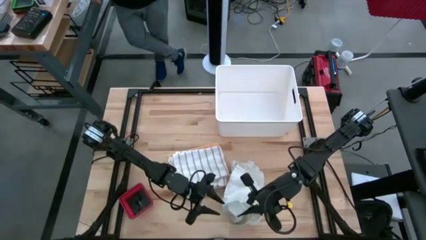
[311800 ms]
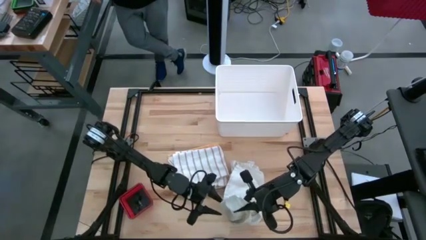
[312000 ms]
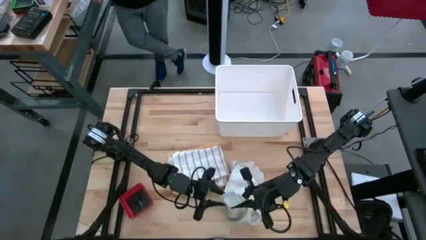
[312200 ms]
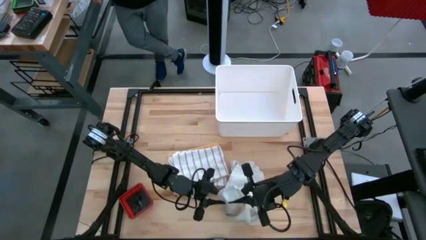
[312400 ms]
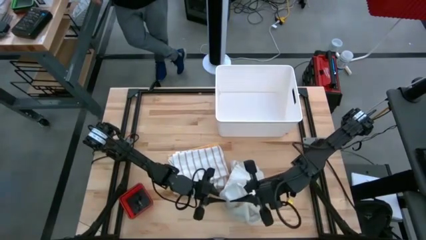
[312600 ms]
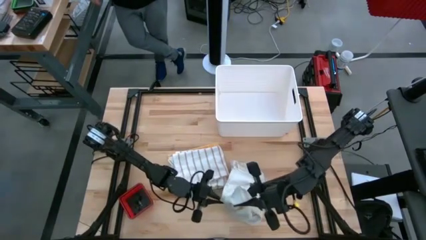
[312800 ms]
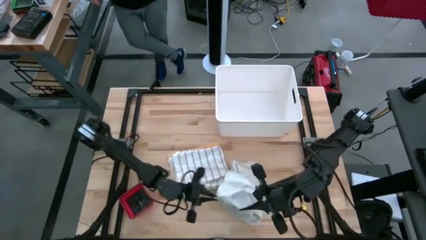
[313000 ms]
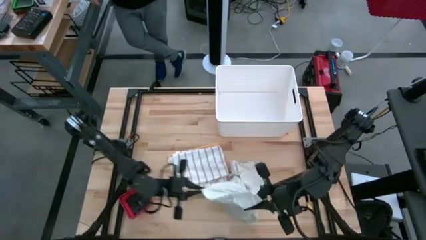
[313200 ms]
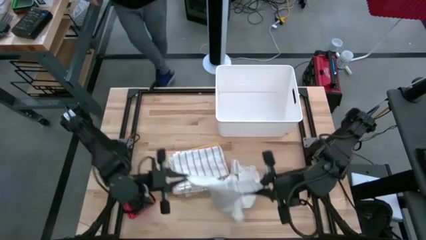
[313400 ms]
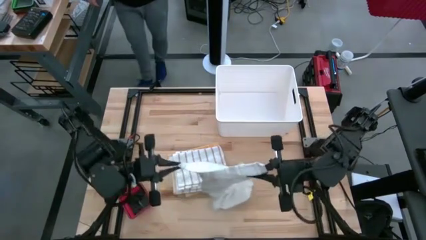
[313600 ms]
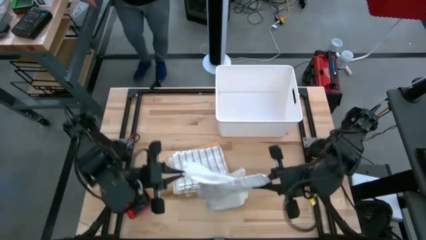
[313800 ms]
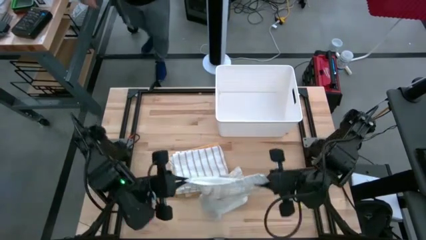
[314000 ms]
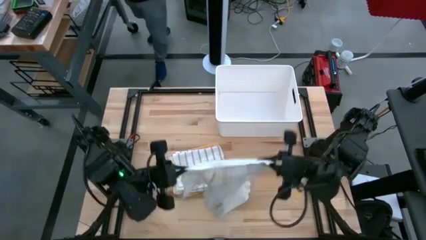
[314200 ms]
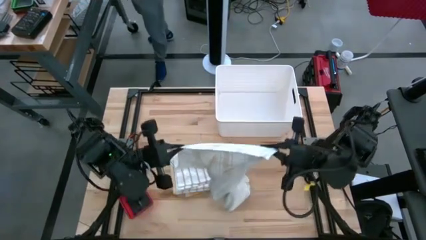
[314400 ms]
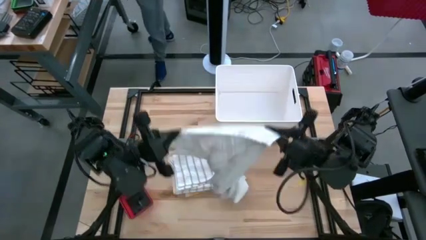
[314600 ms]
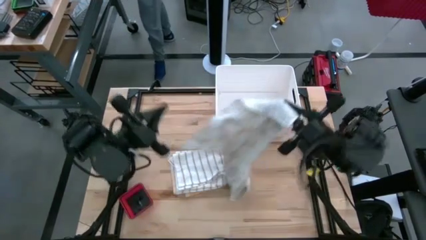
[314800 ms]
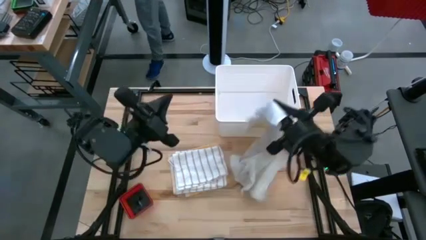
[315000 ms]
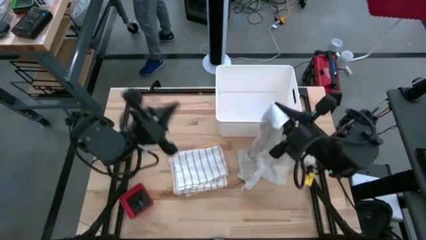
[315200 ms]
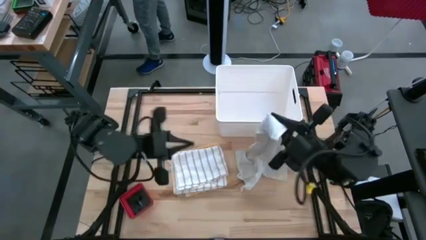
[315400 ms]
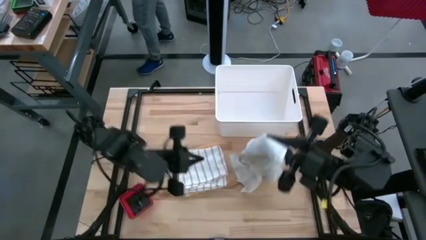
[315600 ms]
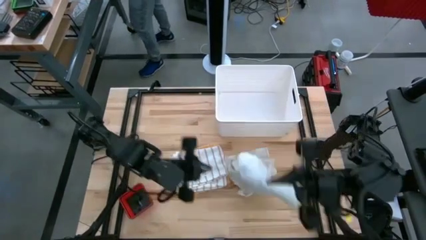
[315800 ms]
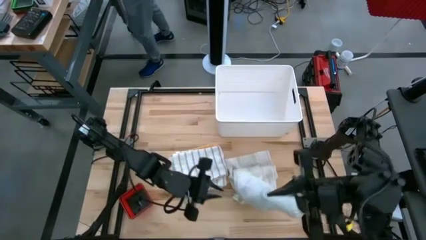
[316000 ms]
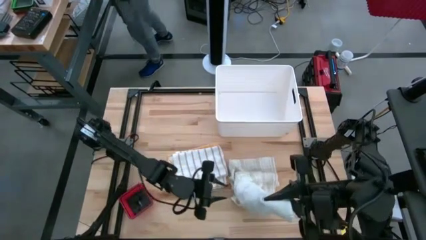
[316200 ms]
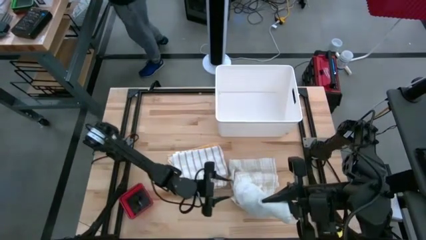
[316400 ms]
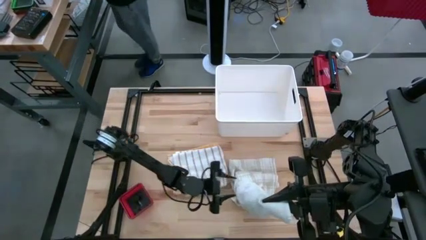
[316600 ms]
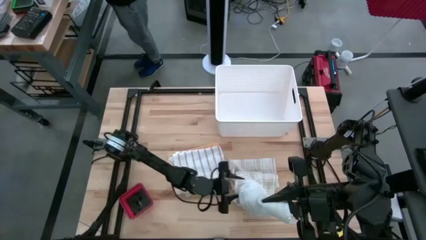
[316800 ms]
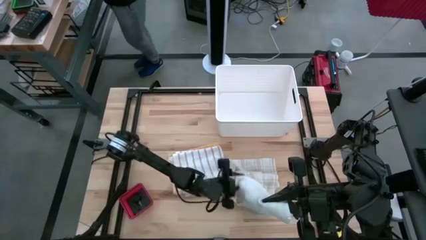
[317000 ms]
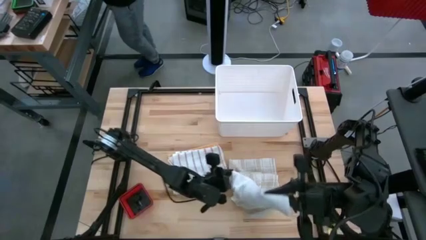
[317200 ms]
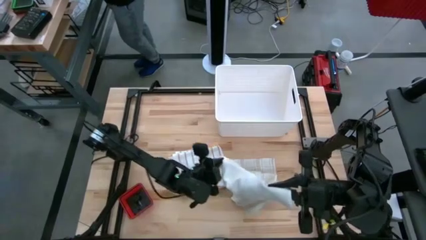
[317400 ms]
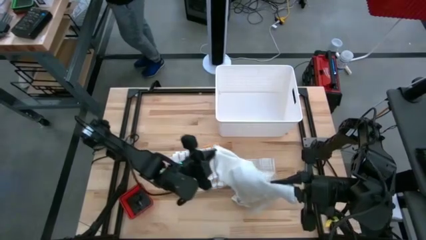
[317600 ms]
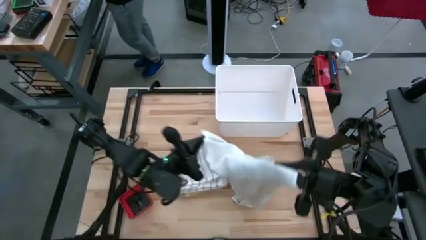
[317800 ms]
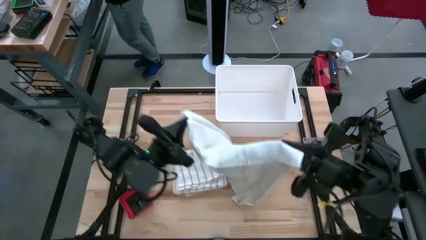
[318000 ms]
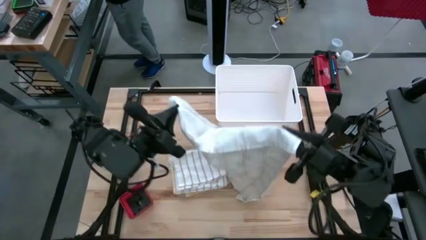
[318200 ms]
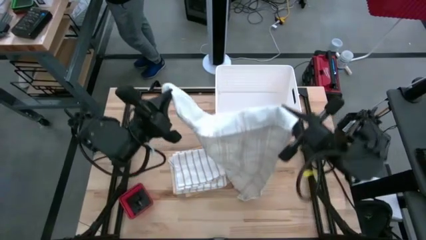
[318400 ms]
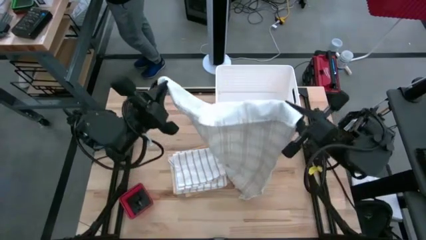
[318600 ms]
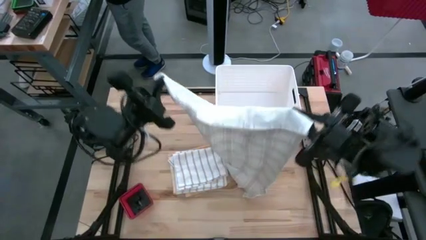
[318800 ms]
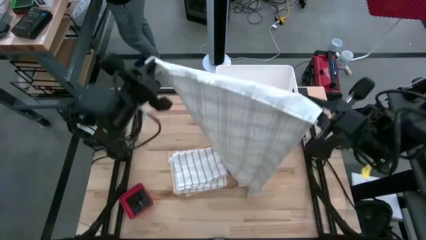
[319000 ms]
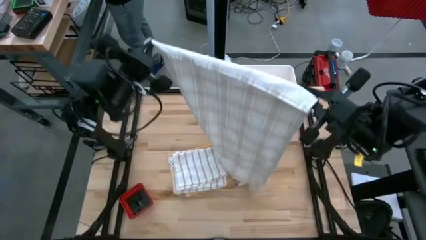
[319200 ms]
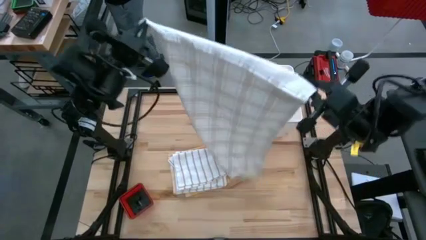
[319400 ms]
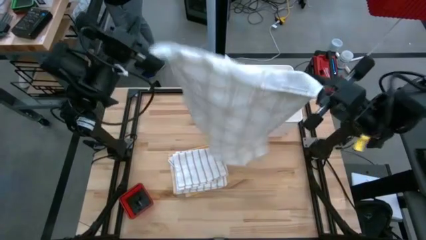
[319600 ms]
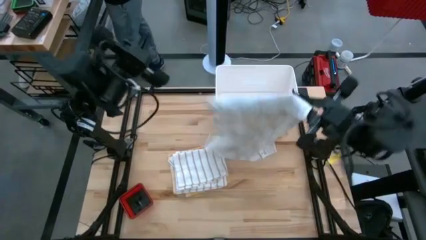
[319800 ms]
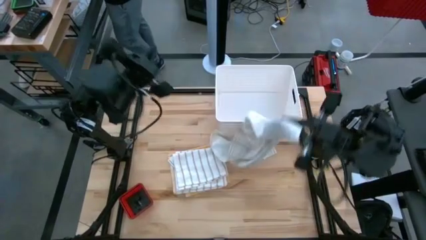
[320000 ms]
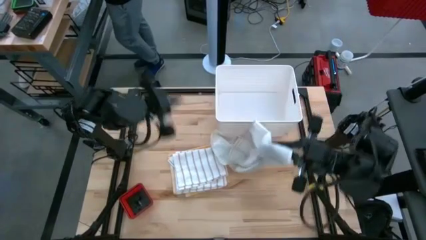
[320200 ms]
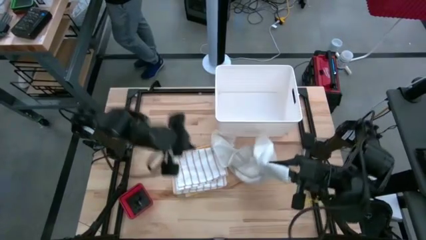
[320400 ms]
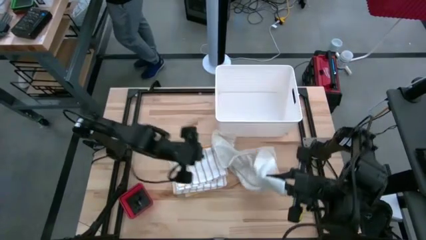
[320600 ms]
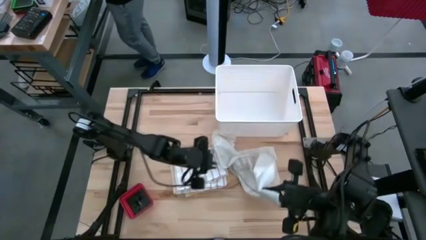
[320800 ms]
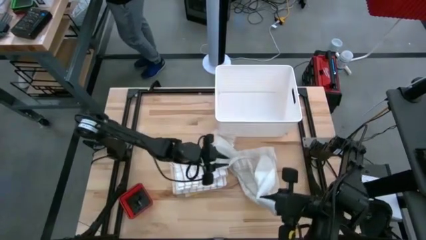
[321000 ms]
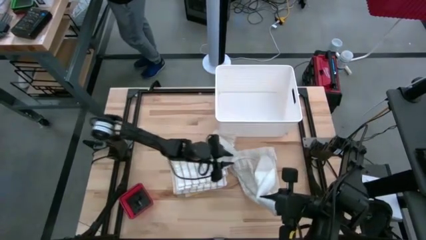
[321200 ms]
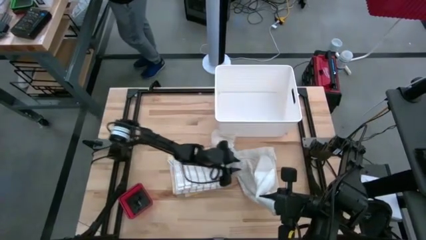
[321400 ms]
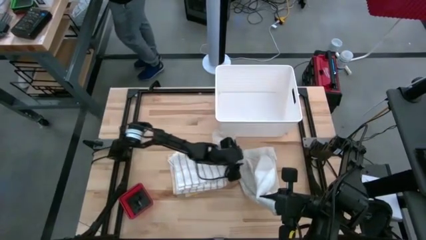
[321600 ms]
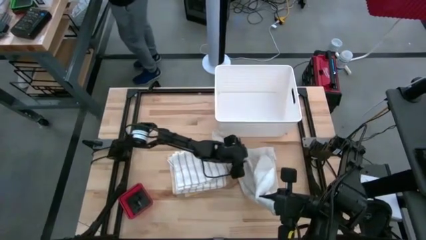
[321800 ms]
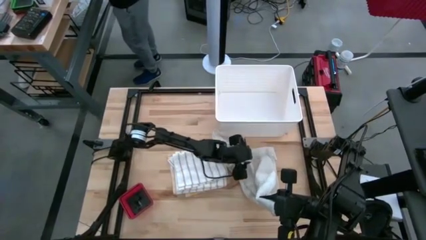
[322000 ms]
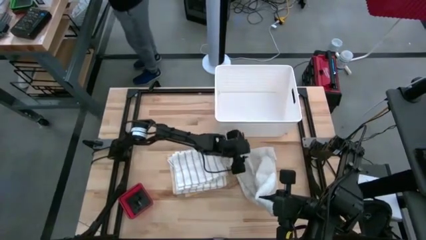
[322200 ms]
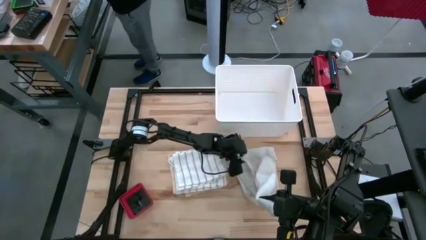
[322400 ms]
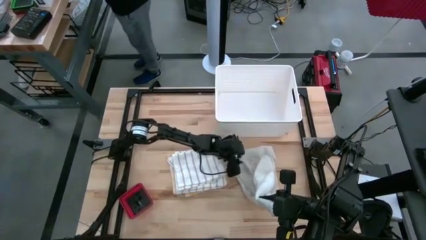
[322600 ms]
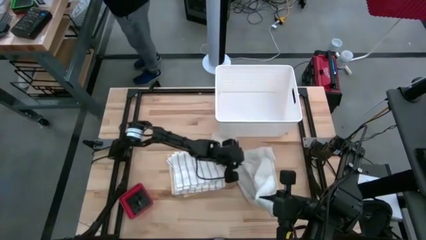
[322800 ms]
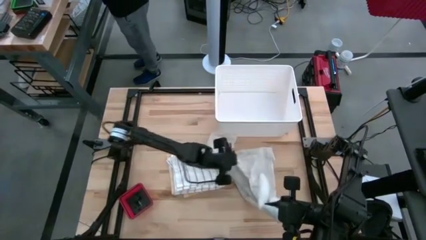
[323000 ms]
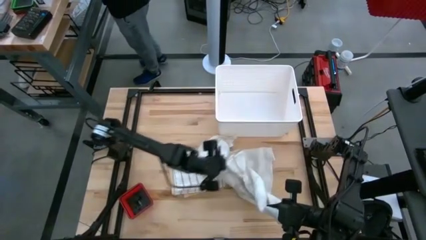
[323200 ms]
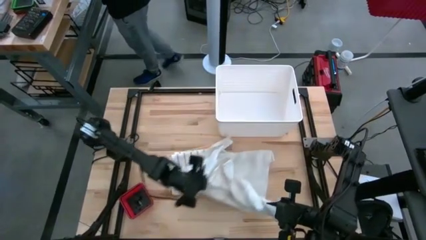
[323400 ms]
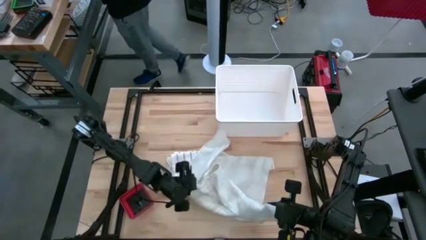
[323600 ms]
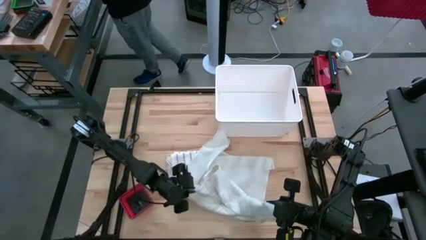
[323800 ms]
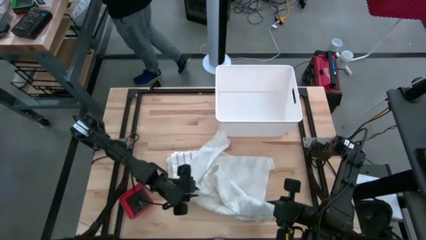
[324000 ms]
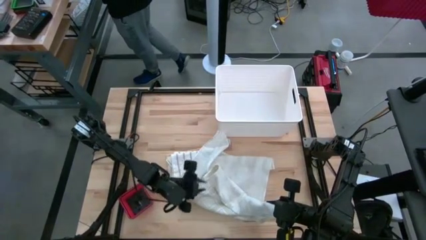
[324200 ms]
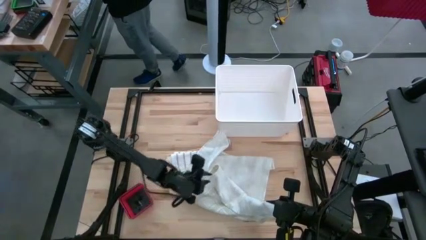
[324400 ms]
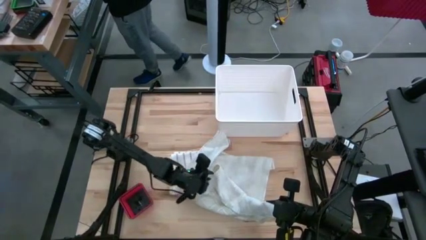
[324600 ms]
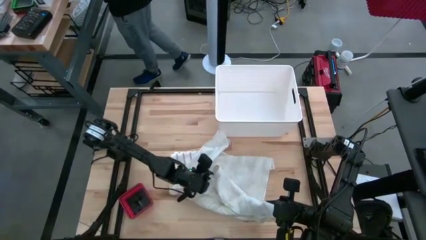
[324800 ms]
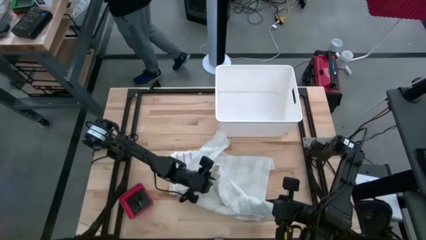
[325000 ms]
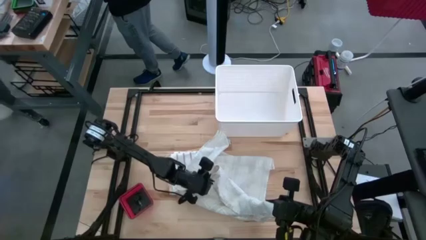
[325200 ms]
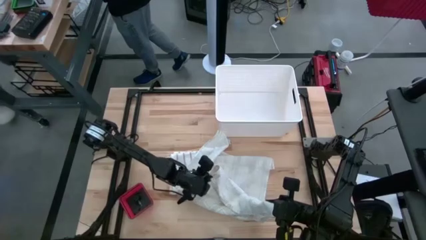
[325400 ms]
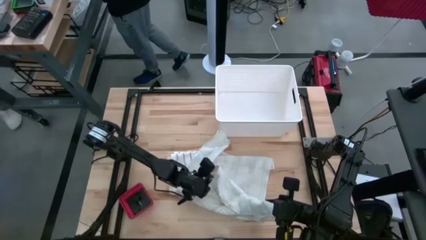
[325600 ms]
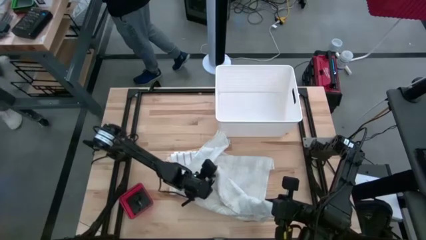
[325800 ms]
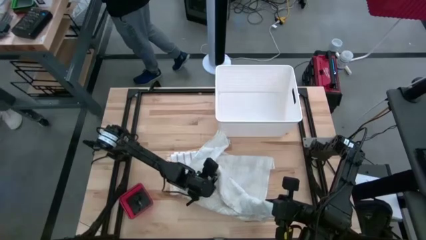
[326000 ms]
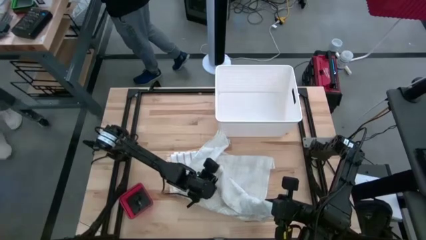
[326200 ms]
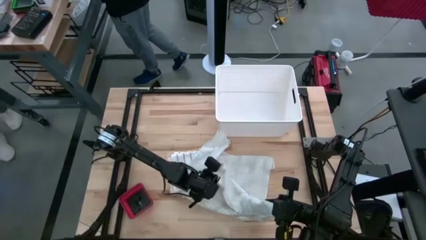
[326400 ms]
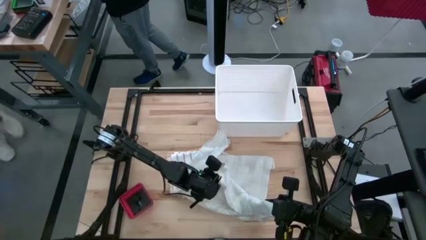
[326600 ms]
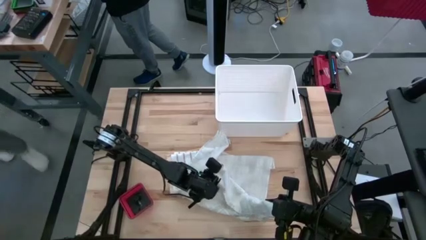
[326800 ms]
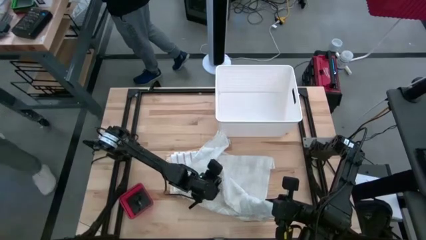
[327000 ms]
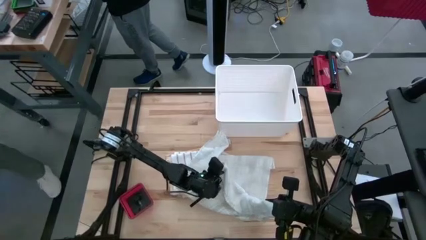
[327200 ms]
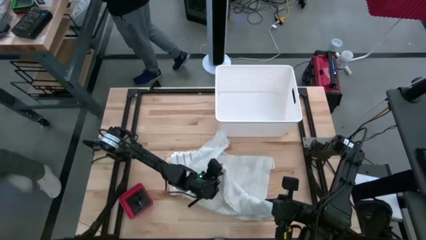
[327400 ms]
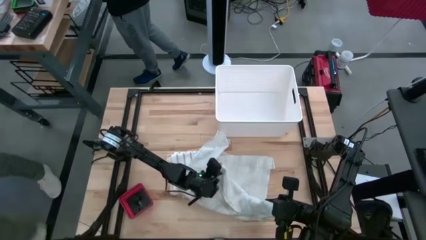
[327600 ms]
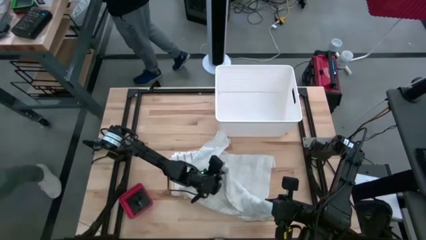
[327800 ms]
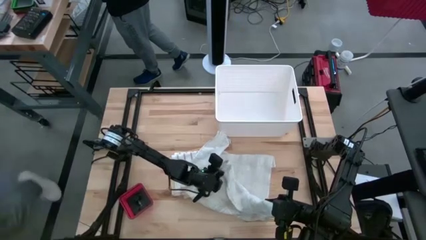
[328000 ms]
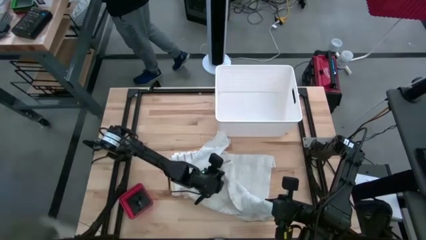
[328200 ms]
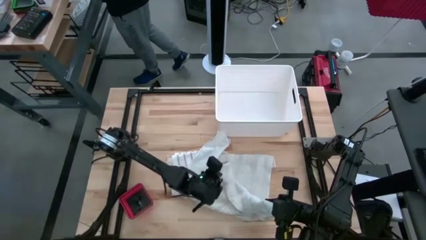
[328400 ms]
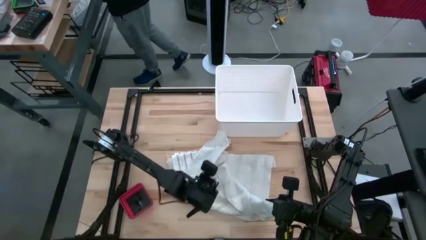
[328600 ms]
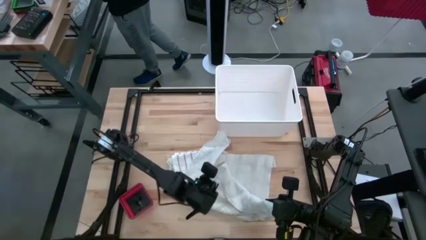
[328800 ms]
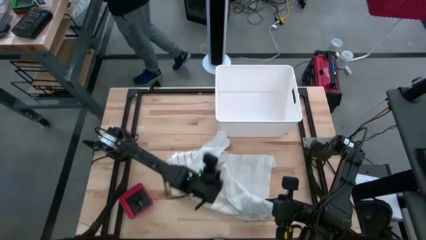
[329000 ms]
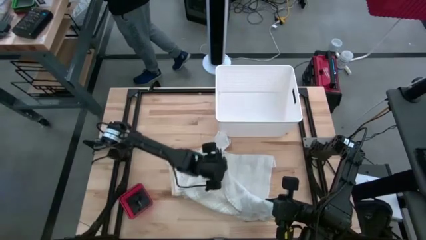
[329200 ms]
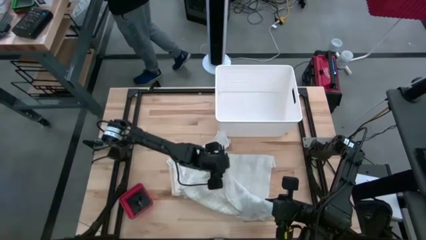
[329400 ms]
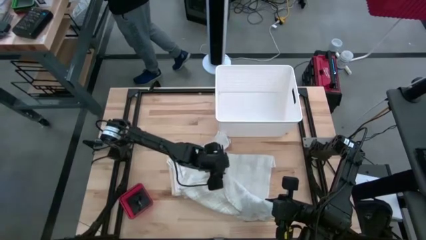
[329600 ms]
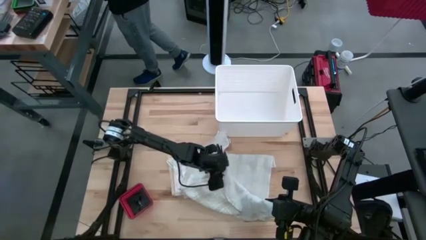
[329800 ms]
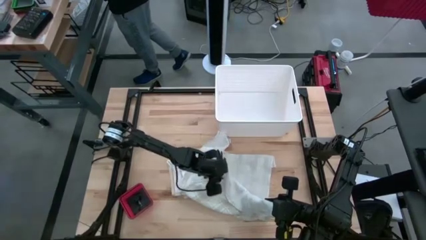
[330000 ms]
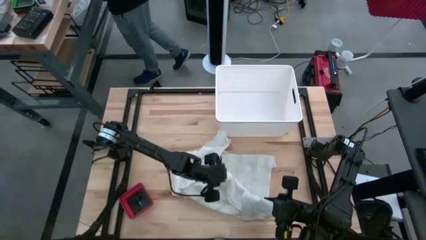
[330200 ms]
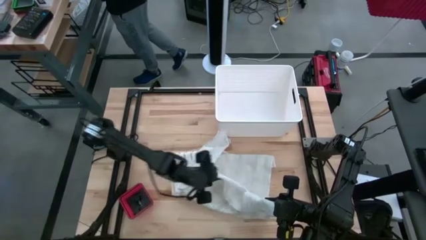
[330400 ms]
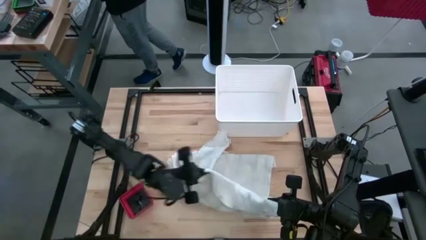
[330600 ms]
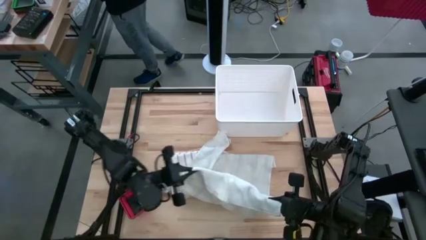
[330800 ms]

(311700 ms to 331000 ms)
Task: Fold towel
Fold the light gray patterned towel
